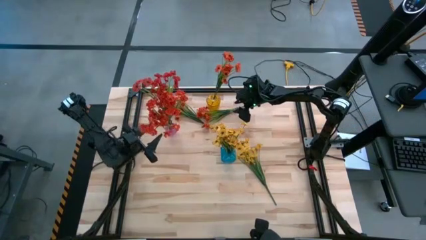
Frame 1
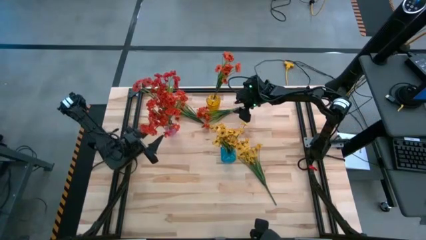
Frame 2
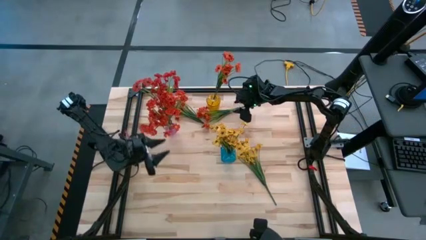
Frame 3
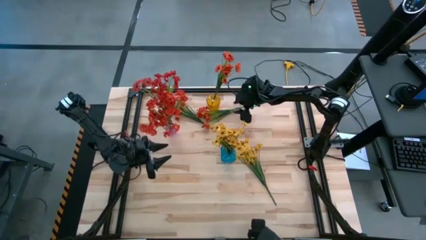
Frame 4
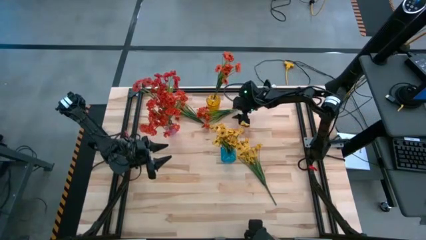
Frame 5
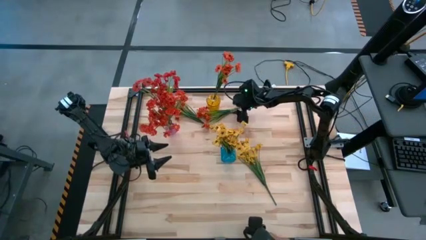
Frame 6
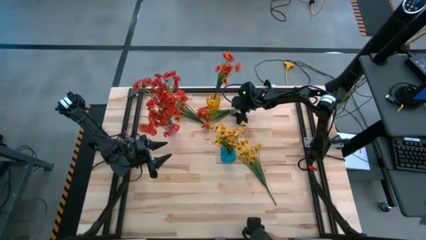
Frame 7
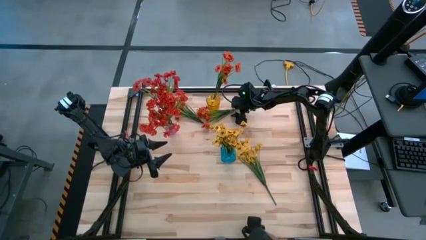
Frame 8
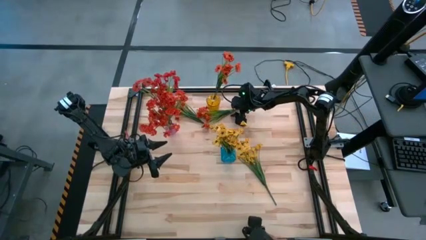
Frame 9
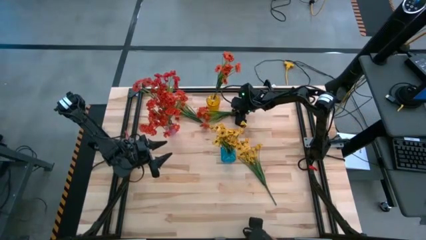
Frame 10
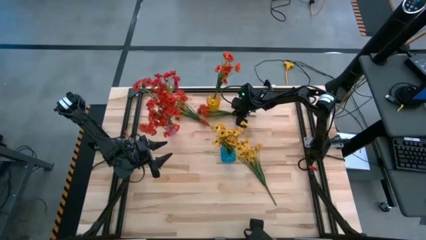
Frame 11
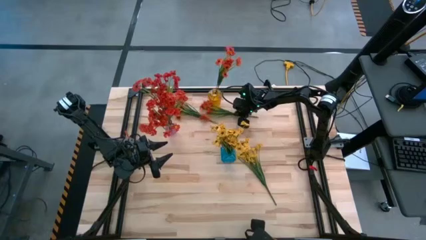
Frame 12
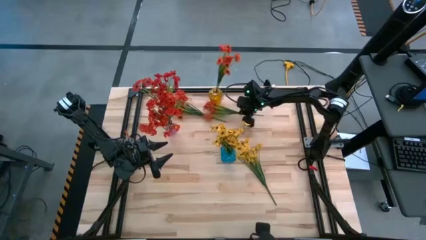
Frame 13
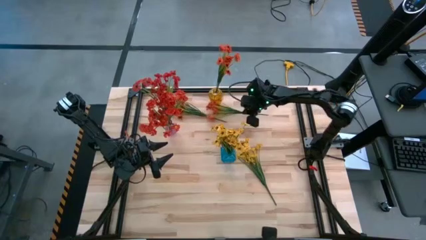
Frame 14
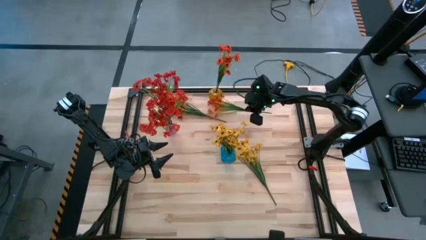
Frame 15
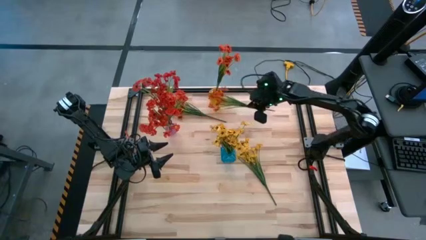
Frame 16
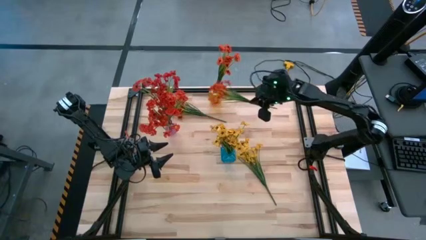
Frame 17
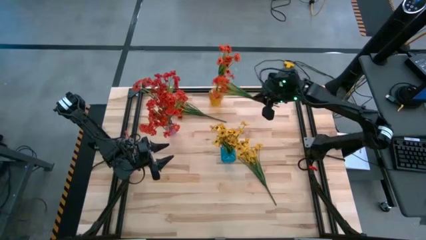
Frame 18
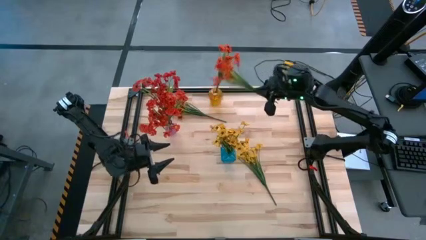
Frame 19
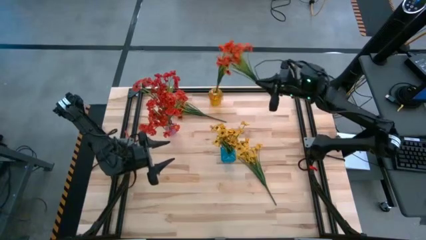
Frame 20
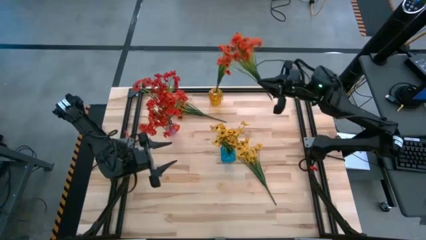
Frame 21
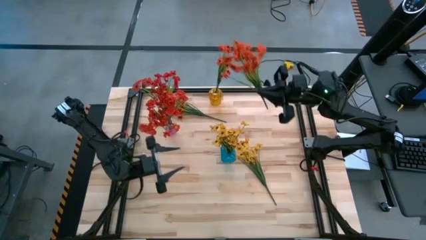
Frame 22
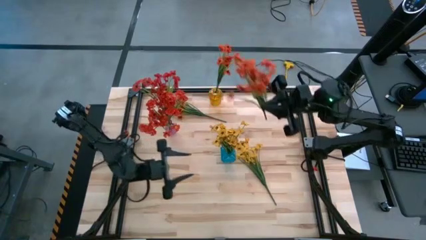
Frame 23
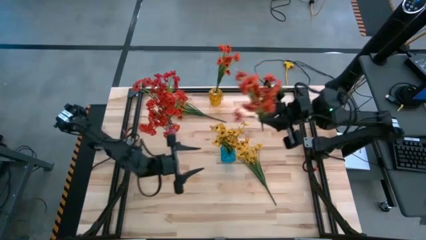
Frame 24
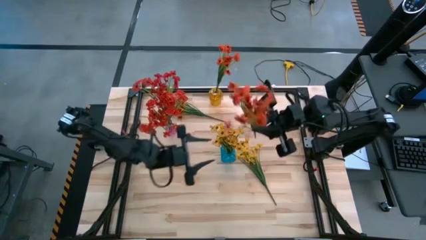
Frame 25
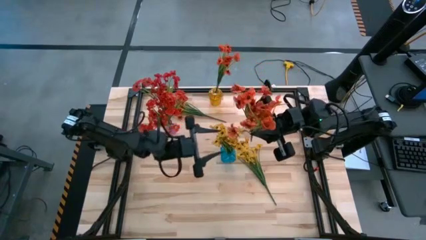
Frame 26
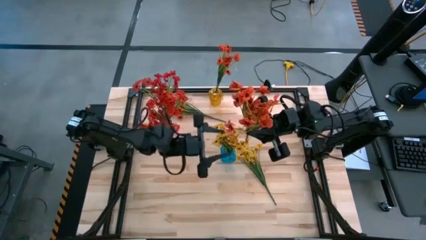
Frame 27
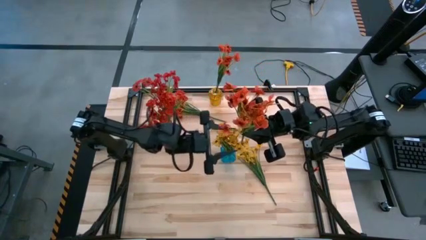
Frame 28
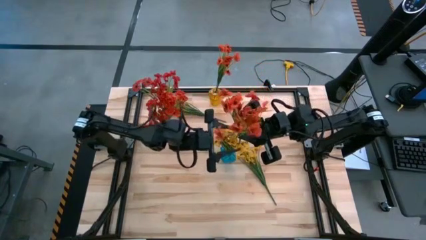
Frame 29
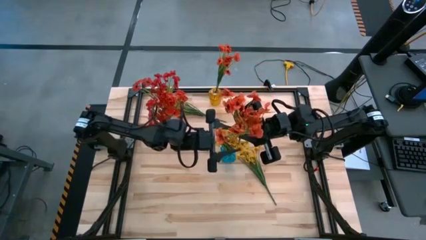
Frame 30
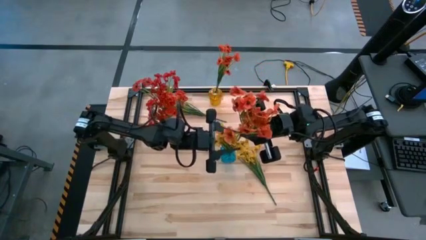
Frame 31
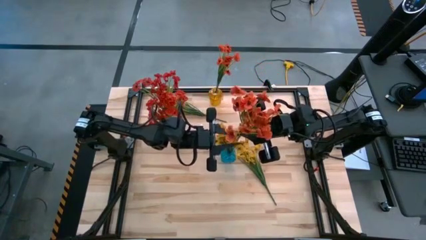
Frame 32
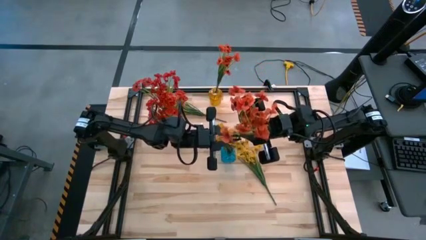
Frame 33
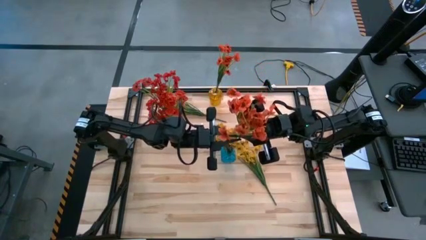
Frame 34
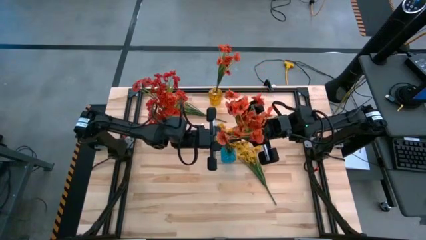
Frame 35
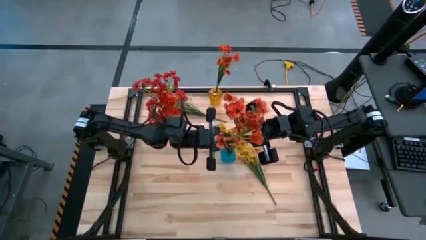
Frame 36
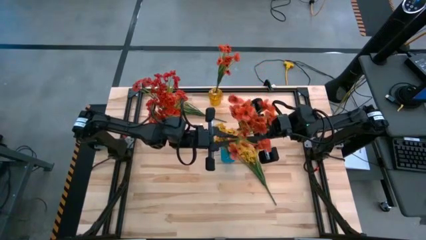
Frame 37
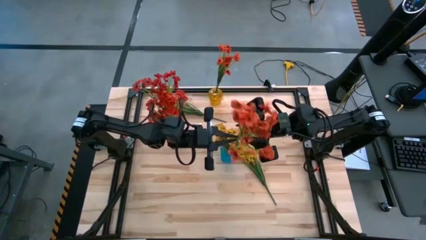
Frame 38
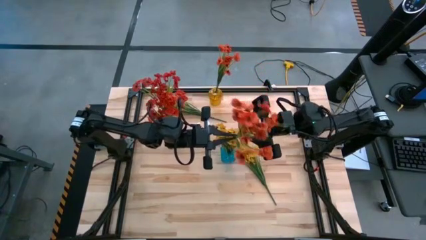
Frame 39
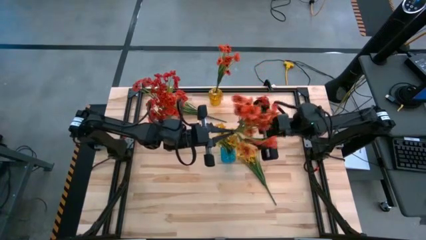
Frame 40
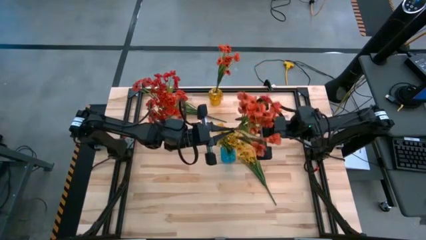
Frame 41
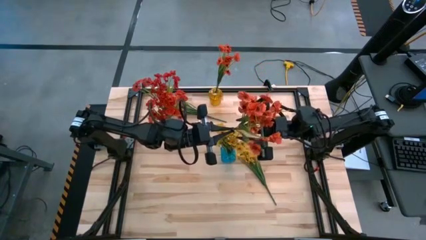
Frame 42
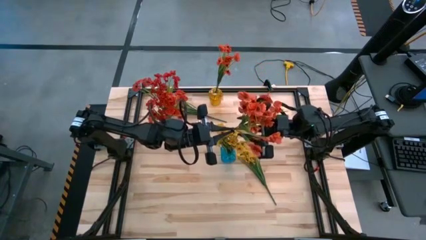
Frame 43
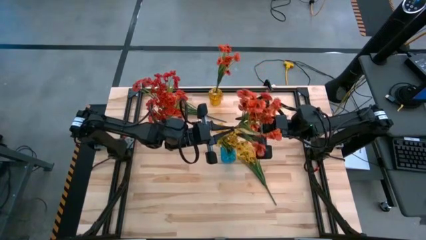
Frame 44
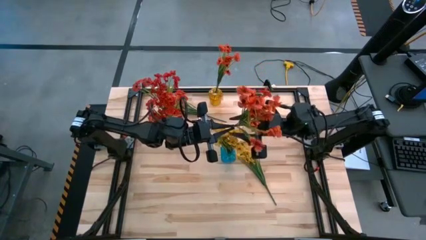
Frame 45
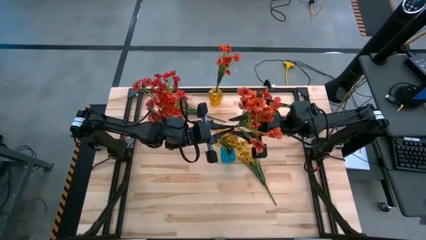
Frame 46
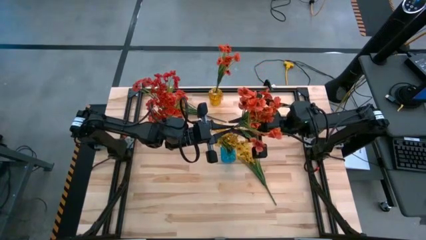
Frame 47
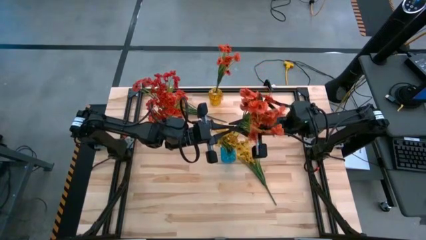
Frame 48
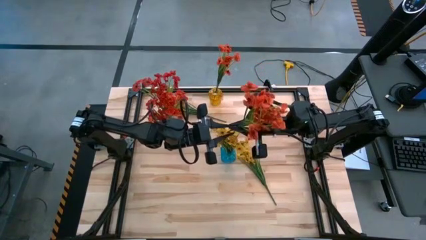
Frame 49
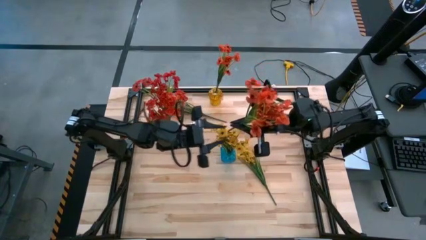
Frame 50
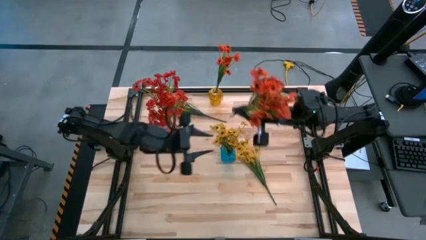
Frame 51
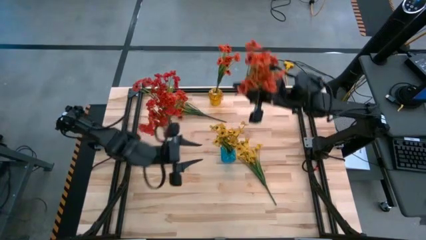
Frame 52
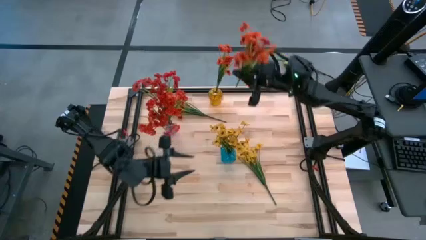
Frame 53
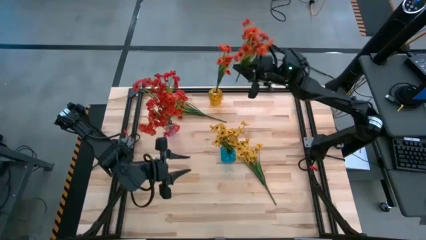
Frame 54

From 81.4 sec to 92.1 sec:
Task: Sort flowers into vase by color
Put the right orange flowers into the yellow vase

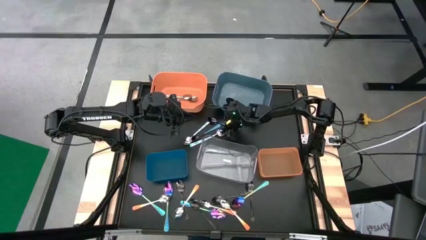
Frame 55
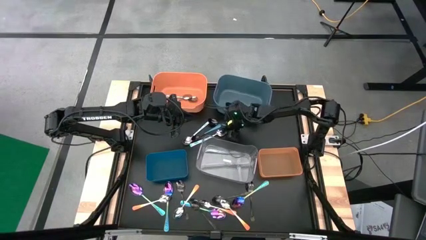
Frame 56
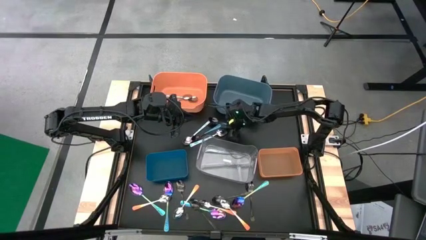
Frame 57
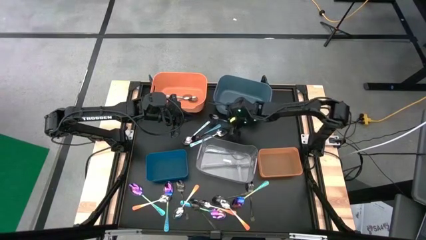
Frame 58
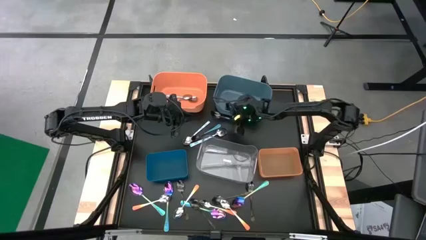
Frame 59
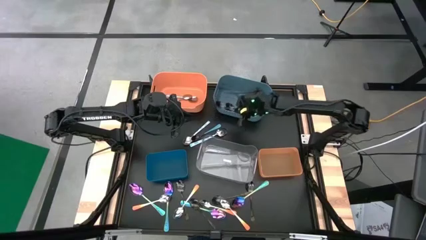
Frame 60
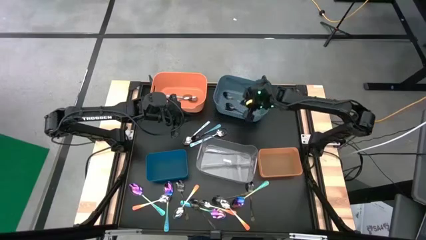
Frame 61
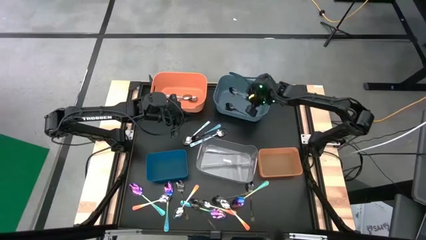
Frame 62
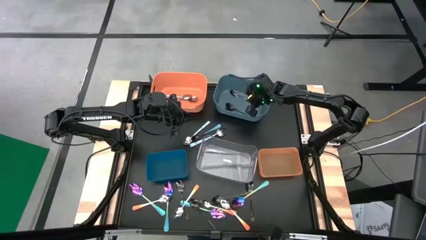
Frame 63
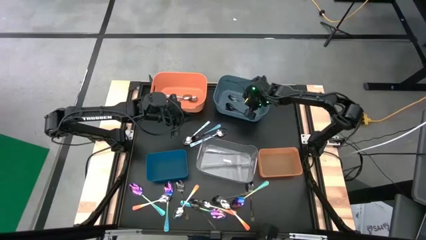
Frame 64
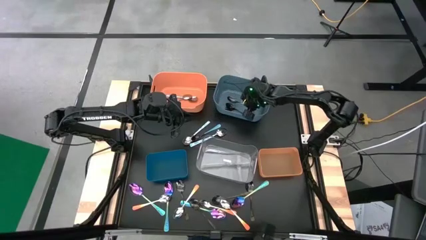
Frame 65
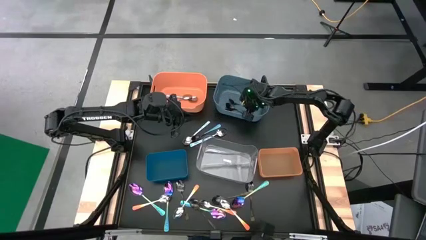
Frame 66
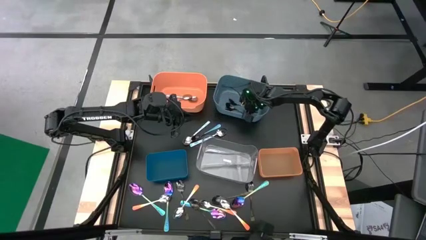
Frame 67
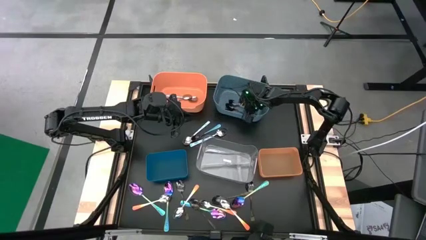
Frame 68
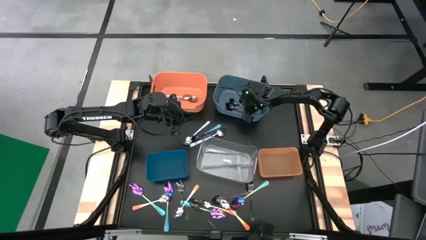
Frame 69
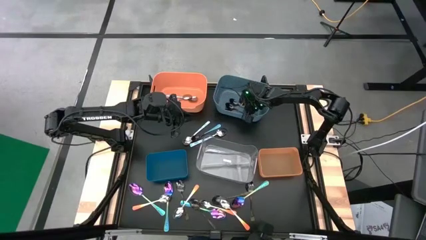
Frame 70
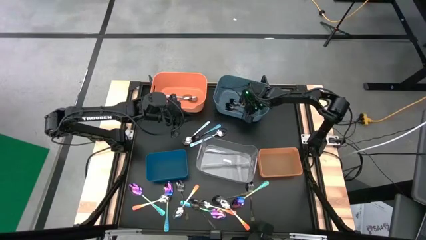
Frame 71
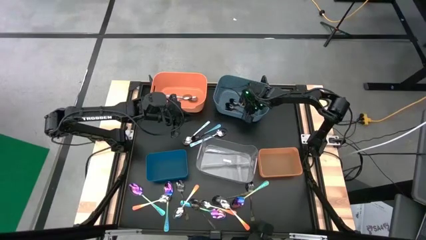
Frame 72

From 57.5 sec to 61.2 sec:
Task: Sort silverware by color (type)
Put the blue spoon into the light blue bin
